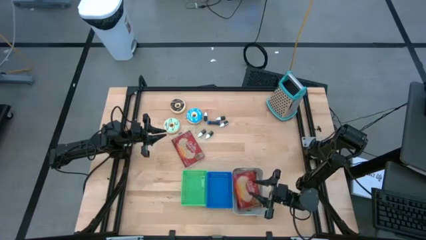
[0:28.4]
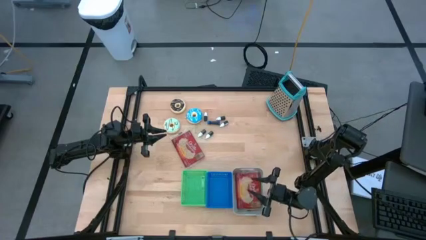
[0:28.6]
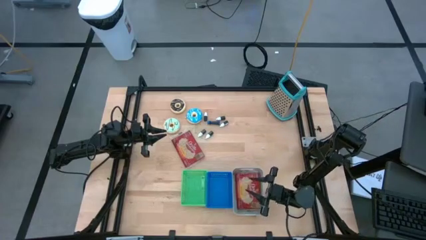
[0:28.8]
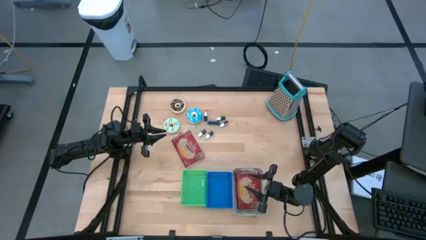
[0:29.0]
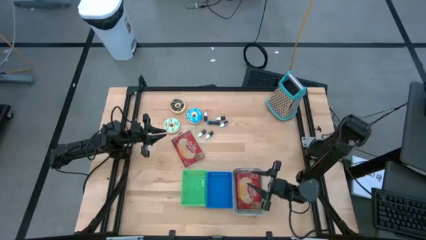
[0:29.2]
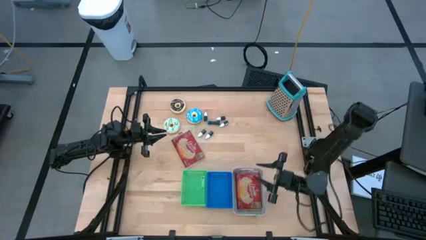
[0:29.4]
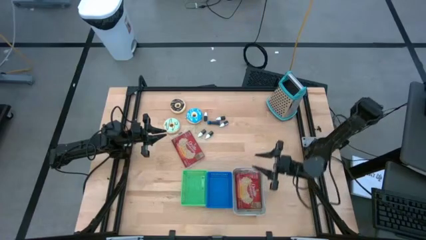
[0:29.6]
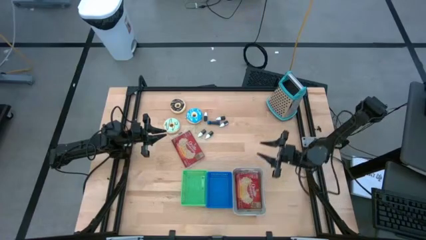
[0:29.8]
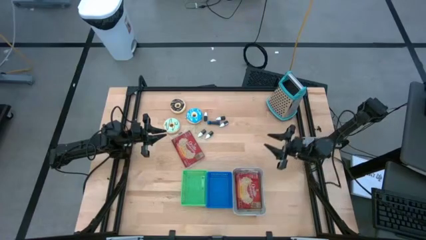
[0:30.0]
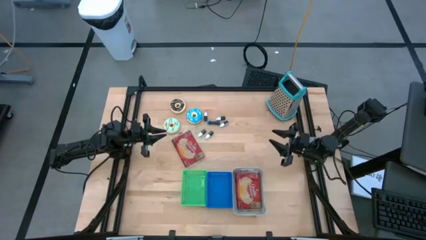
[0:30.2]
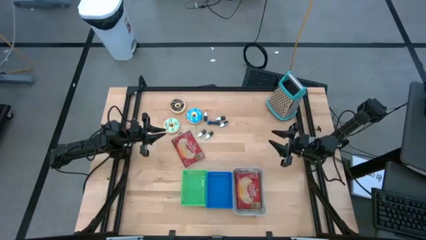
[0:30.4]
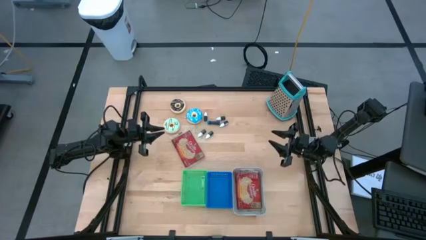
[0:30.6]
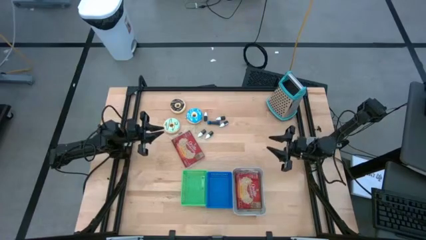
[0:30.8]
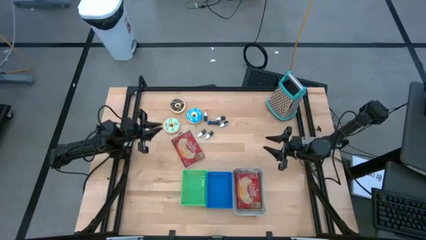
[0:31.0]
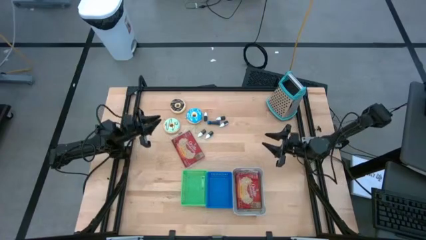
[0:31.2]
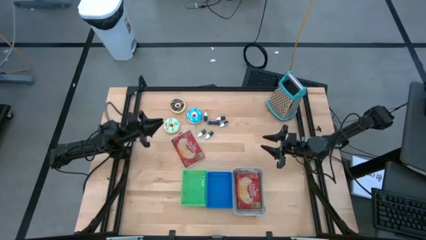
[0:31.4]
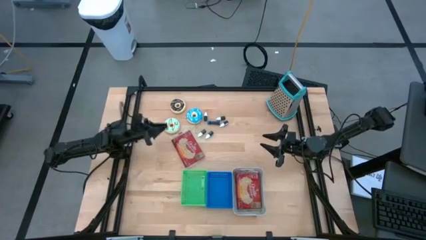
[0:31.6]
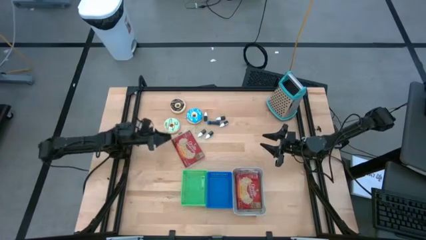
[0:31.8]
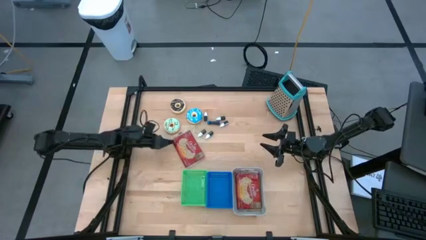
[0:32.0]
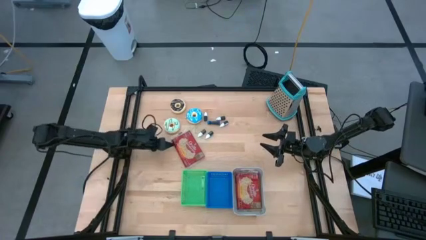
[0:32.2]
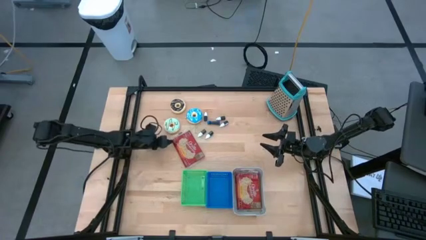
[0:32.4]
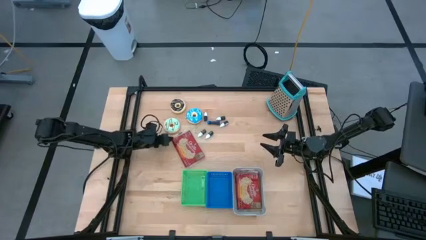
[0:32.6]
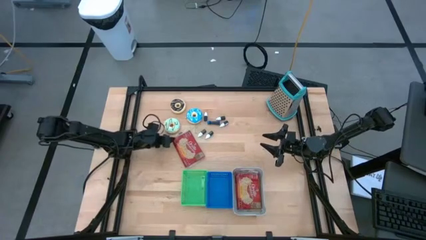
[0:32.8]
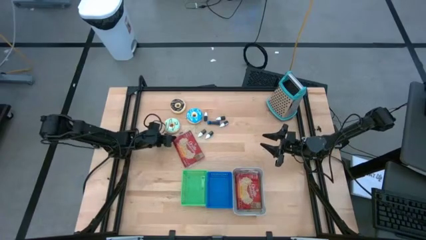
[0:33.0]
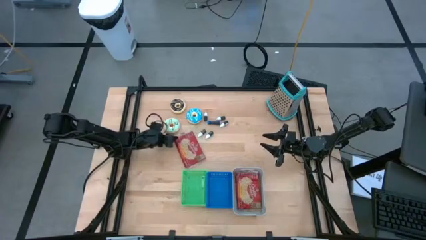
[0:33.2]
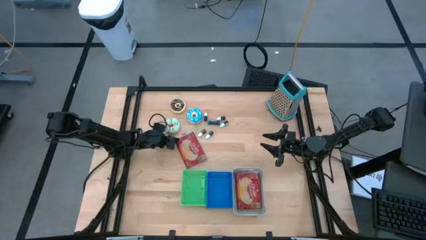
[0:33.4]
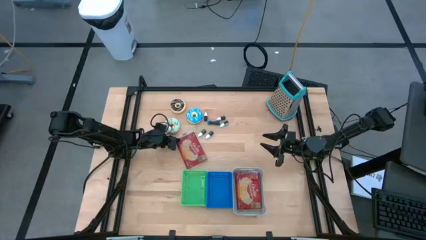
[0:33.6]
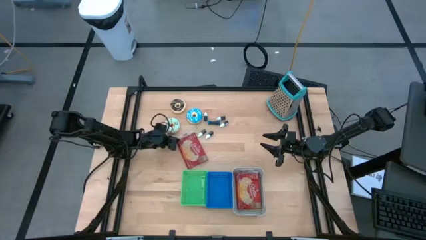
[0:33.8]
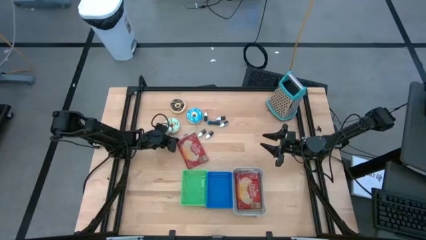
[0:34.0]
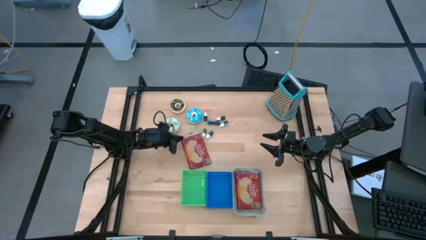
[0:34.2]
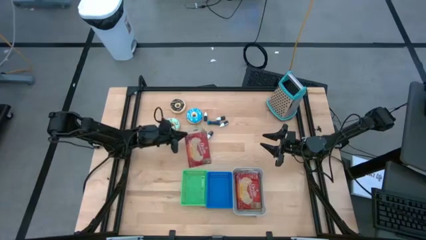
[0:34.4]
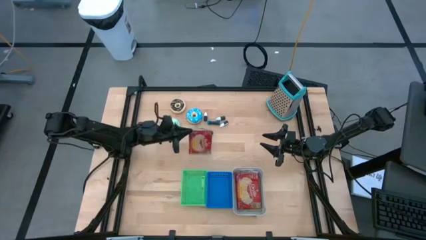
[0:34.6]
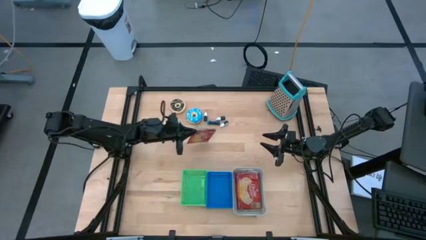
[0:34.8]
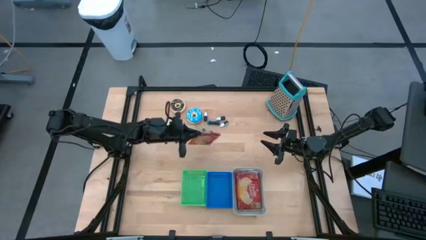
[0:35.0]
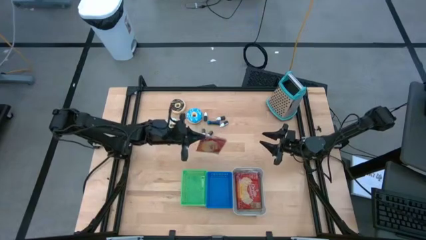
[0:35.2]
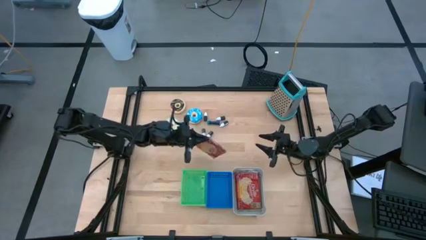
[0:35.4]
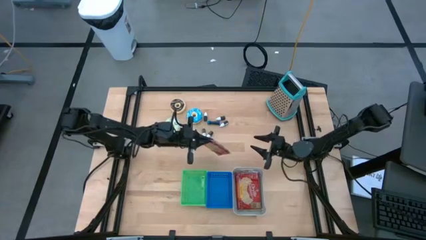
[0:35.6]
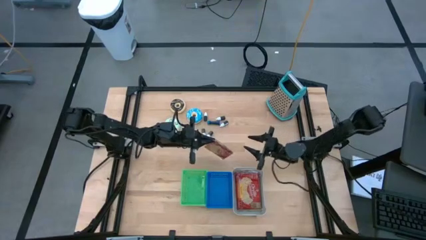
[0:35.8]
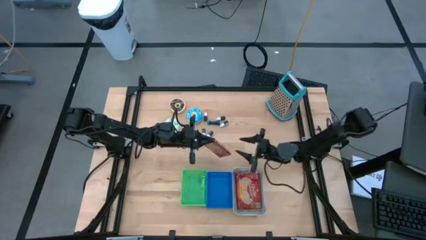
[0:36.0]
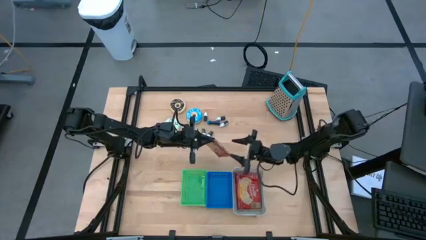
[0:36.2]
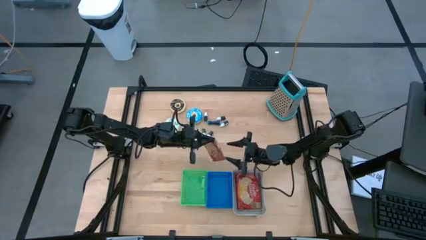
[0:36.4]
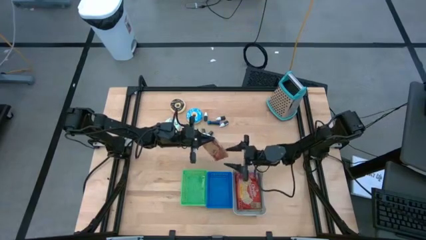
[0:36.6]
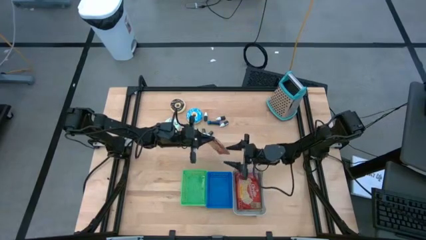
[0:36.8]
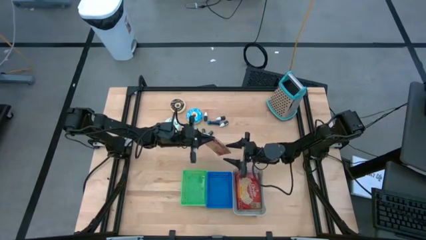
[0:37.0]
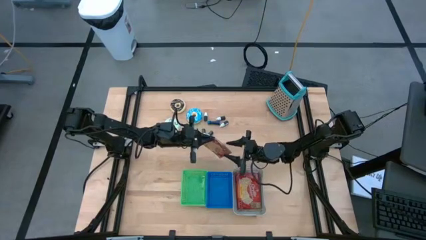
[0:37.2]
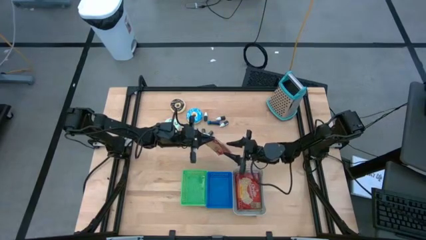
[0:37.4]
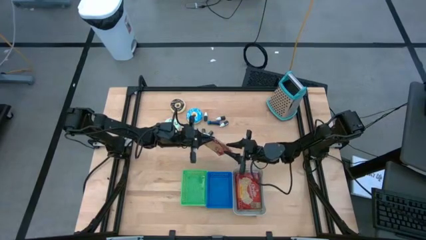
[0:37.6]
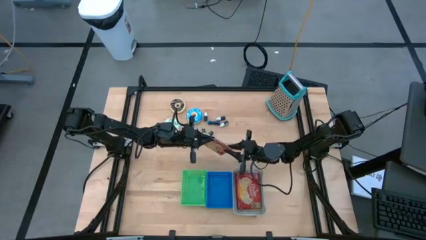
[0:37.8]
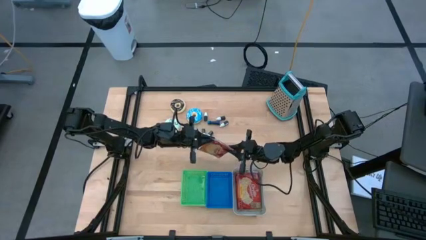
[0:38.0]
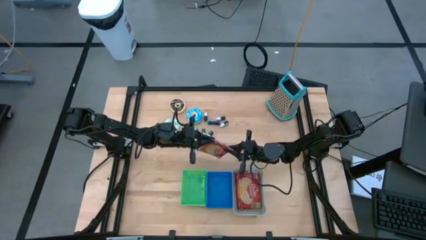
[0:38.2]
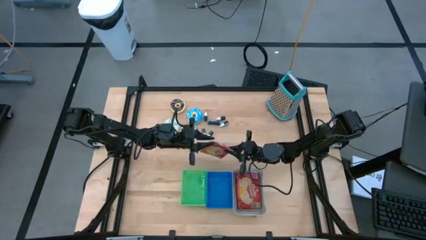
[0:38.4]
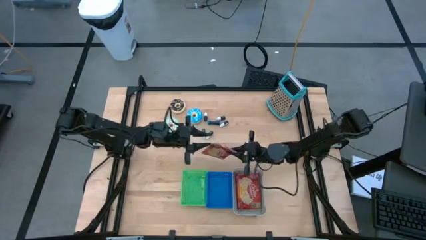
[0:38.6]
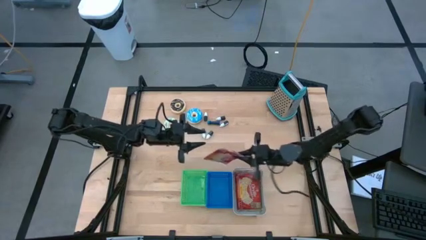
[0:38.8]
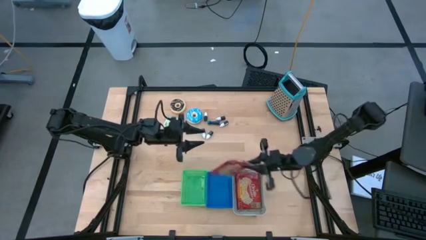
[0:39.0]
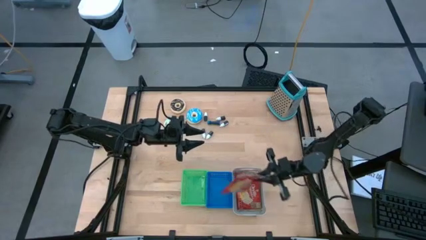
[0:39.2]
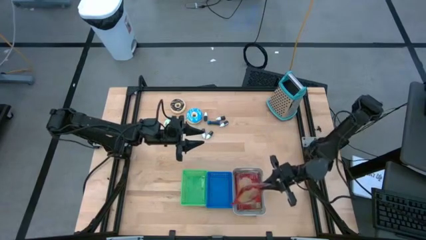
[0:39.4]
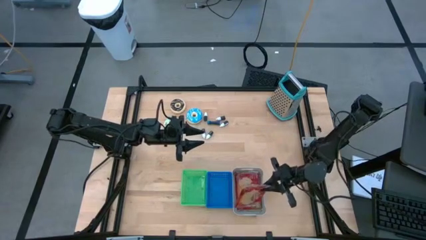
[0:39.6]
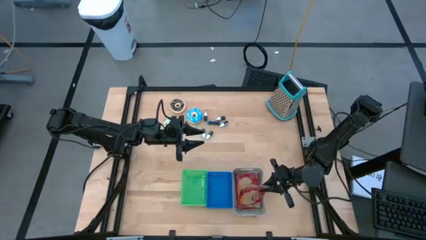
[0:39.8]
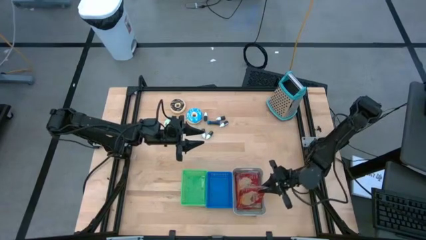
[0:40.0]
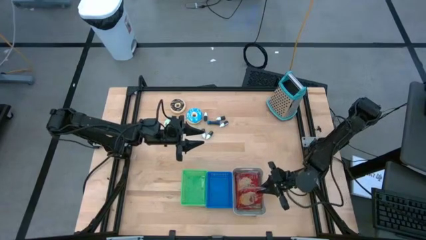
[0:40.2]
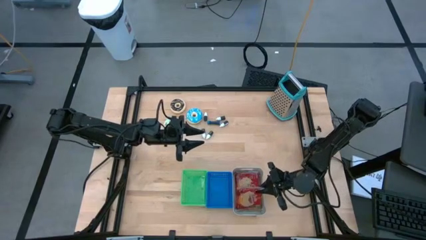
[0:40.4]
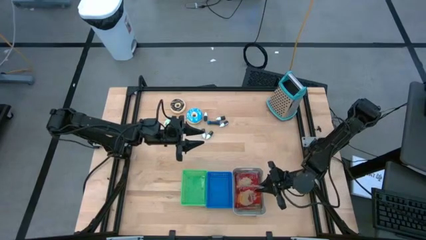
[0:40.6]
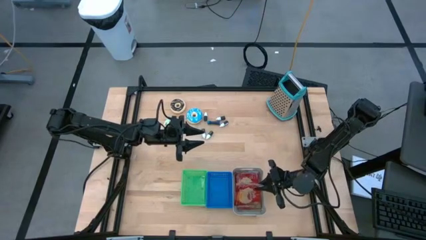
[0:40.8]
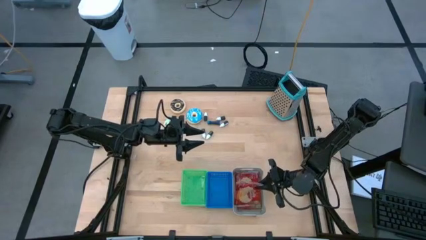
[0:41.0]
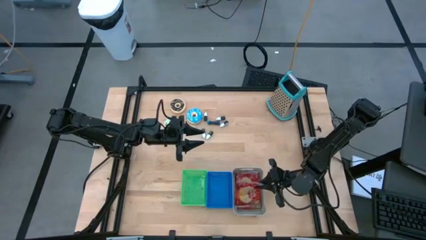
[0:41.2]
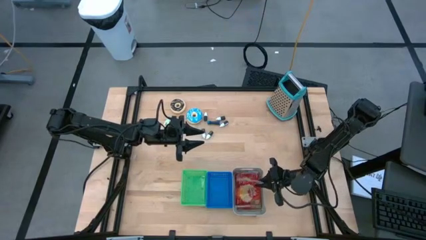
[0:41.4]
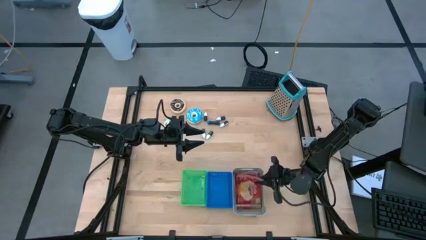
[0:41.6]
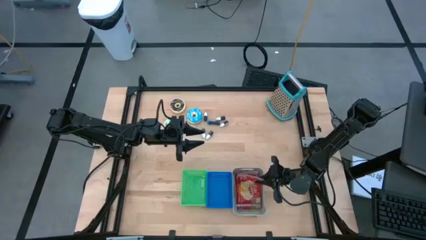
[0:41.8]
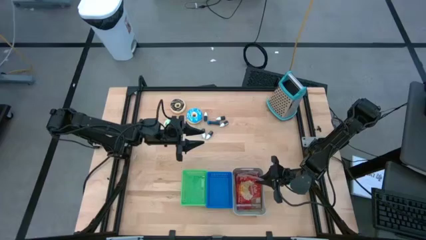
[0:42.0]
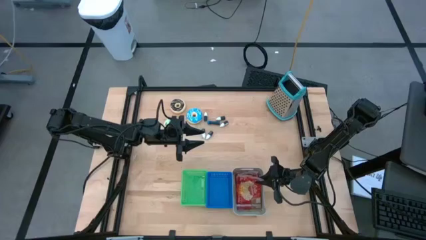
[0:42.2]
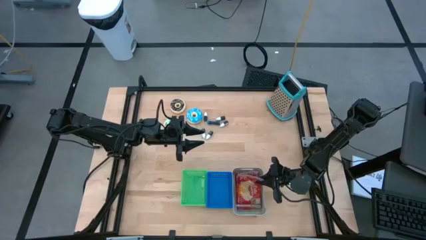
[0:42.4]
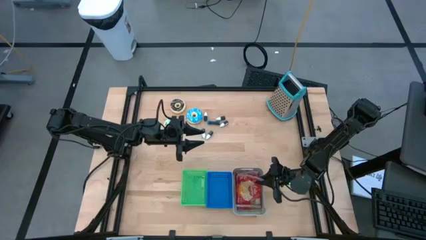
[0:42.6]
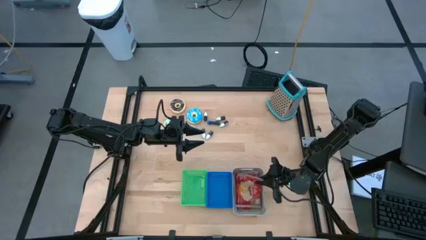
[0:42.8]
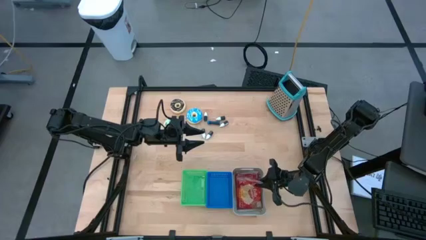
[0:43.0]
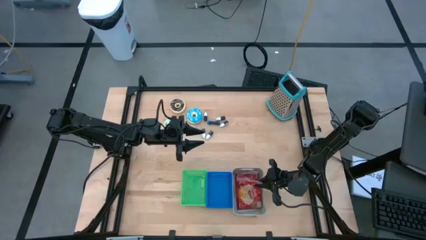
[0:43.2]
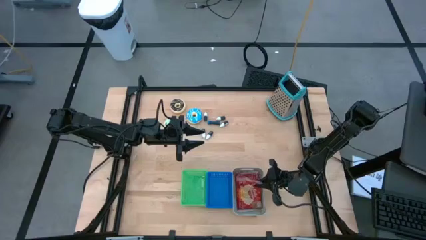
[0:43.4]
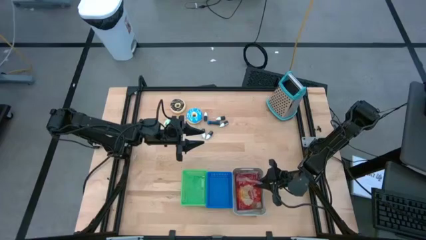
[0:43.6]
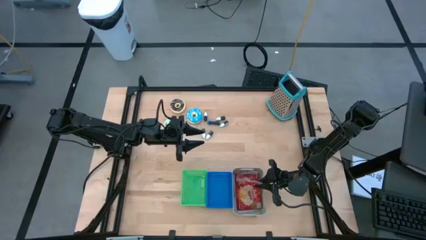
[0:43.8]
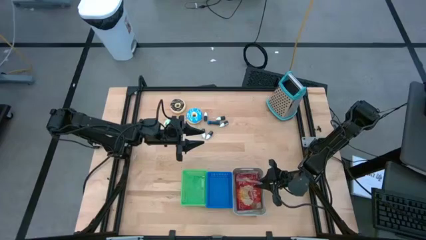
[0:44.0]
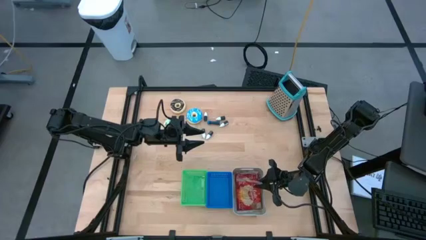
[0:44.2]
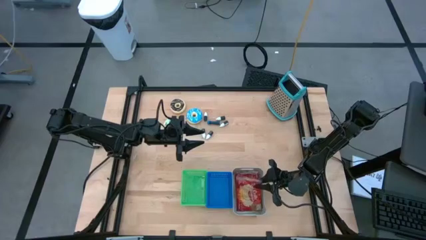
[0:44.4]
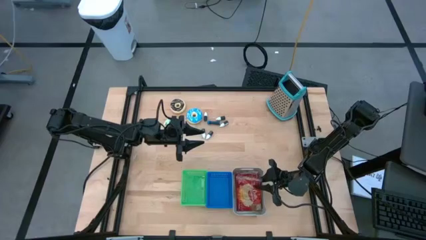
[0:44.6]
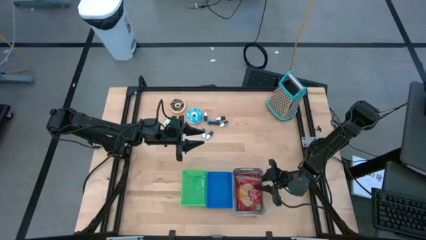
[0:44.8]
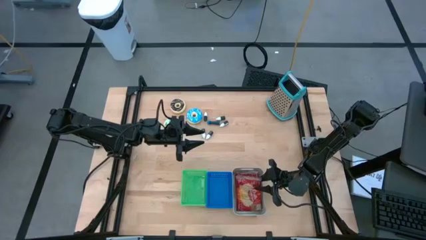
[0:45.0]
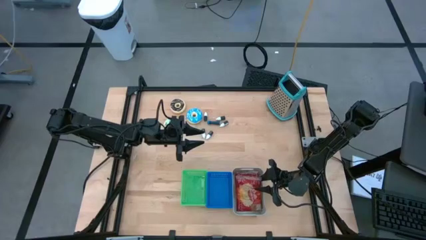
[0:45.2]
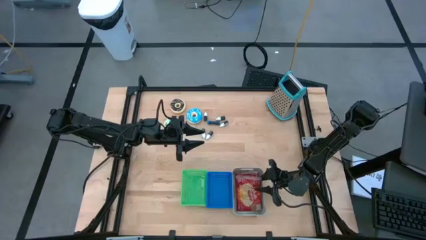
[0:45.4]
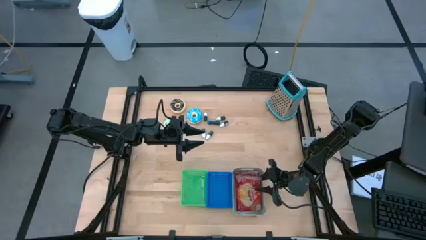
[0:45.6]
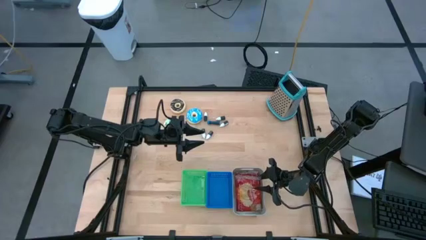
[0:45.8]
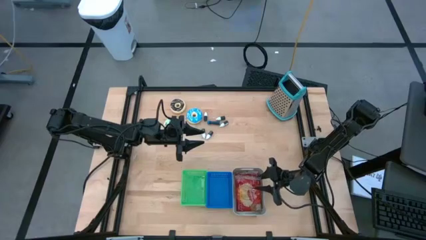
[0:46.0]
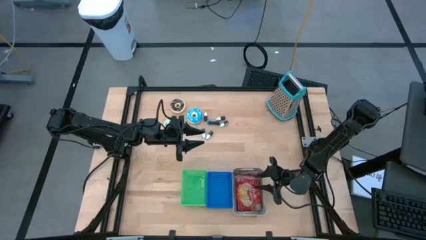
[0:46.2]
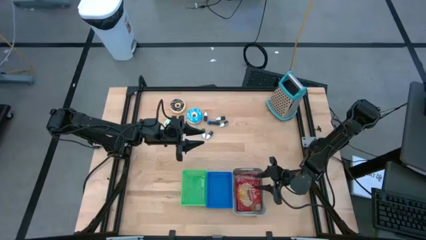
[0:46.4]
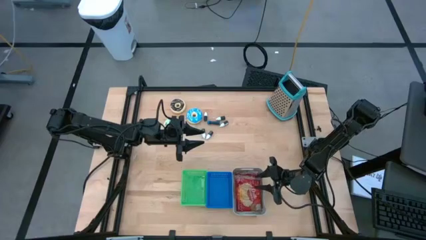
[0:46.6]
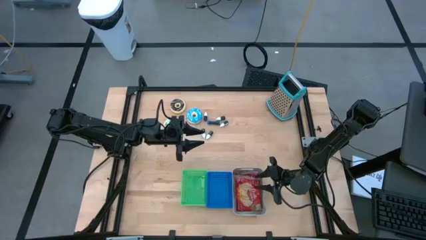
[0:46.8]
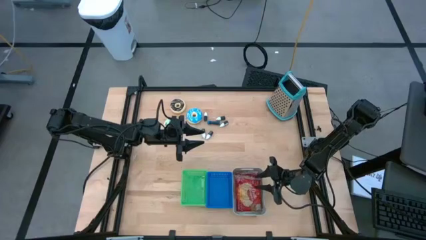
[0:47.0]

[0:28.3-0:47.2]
Put the red popcorn bag into the white bin
